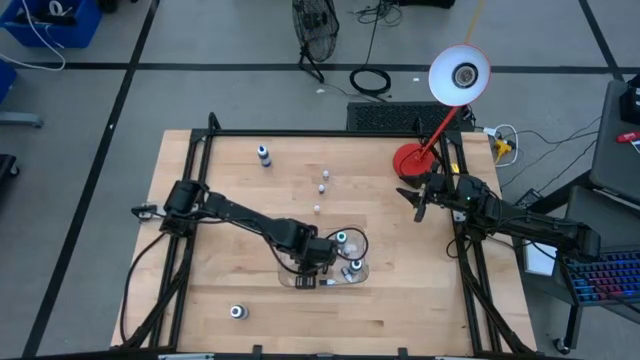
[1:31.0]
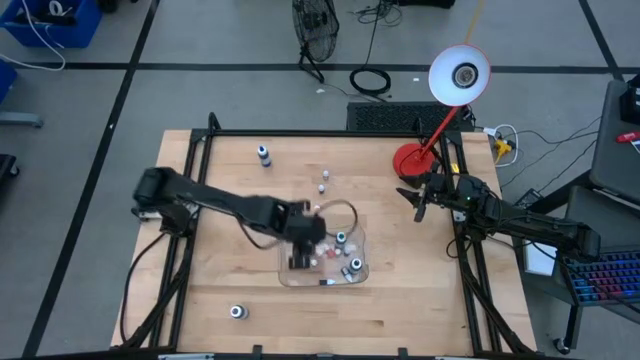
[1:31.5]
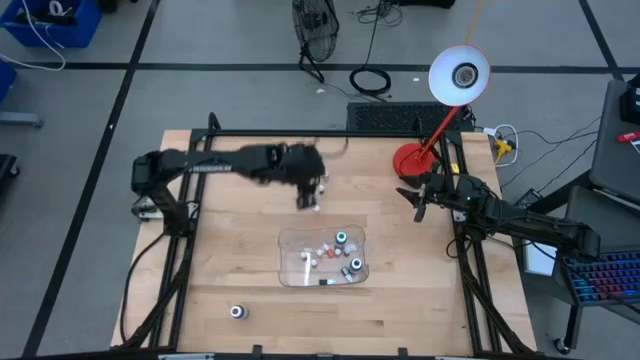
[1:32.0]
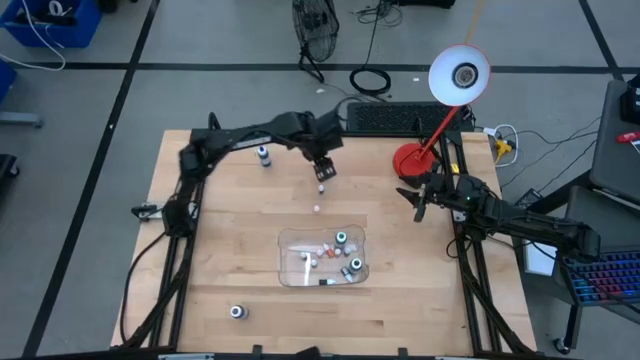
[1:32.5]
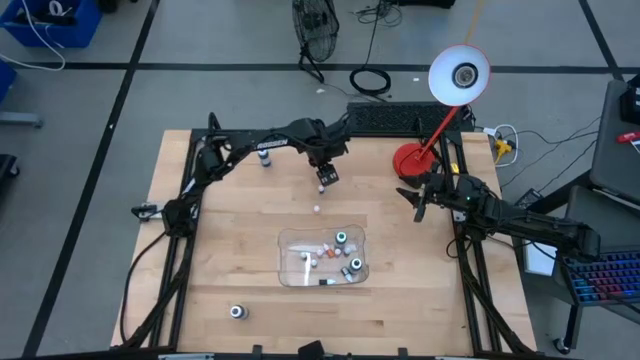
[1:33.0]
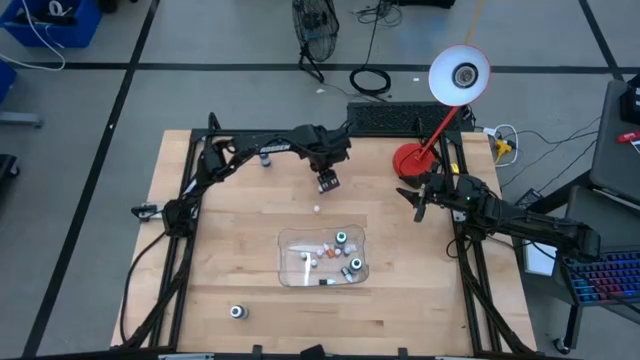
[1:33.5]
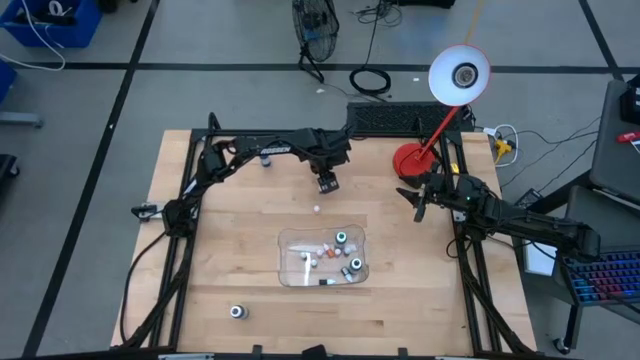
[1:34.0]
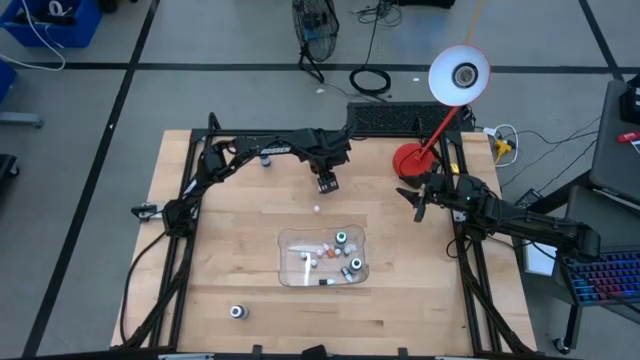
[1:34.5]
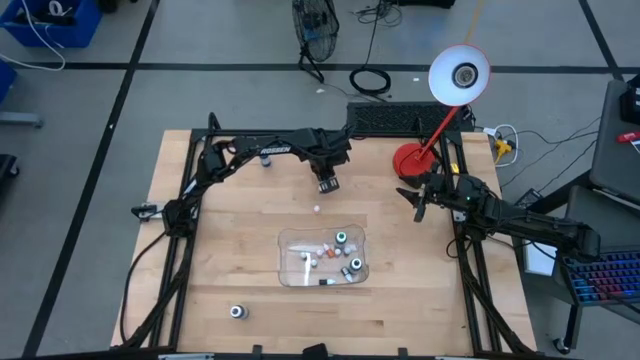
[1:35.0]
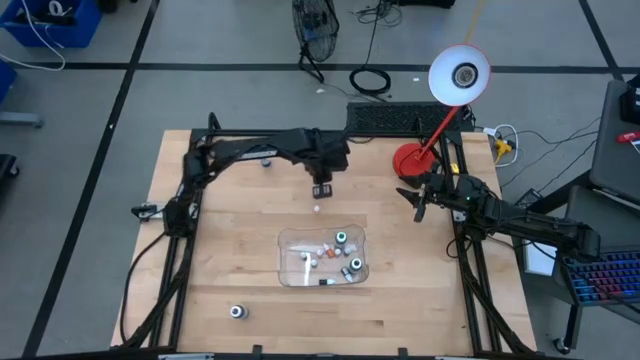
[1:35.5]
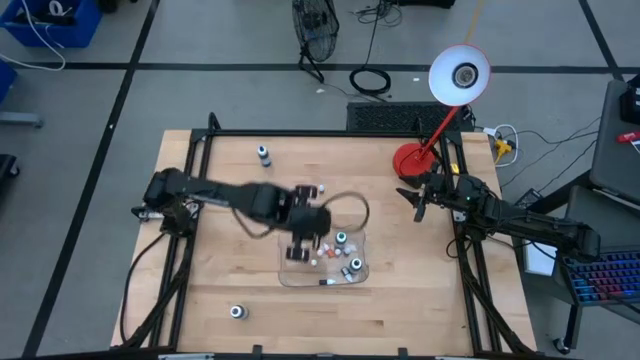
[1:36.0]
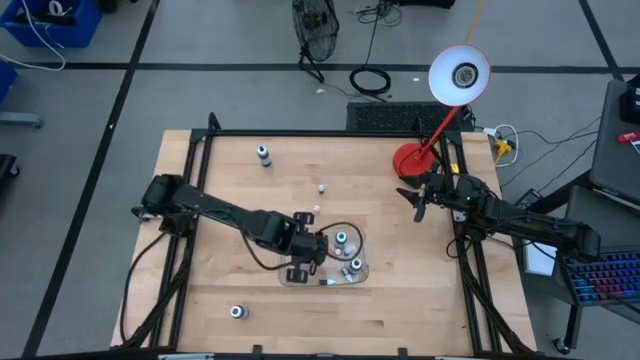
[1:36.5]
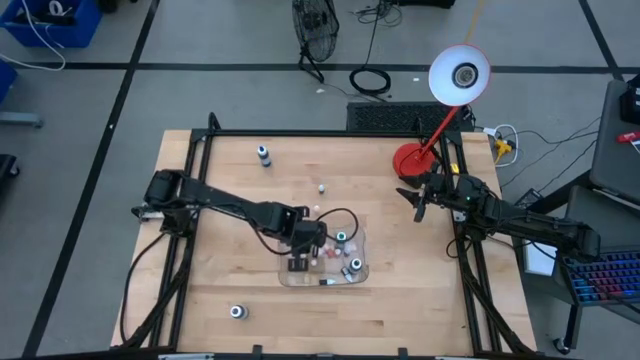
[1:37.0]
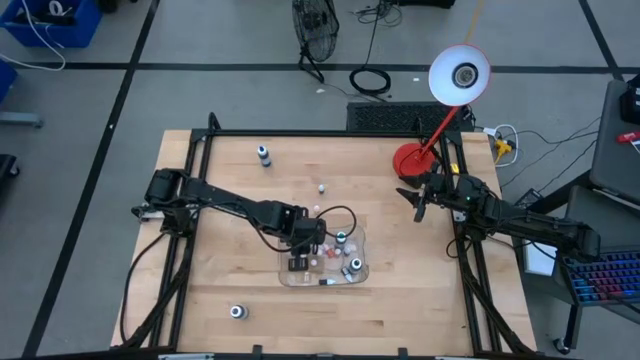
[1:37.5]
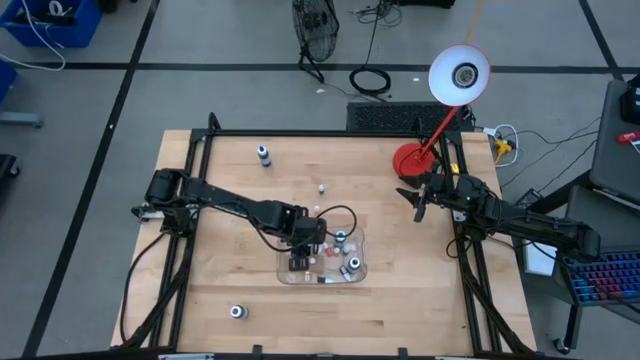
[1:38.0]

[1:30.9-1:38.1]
Task: Pick & Place food coloring
Put the small green food coloring bottle into the transparent bin

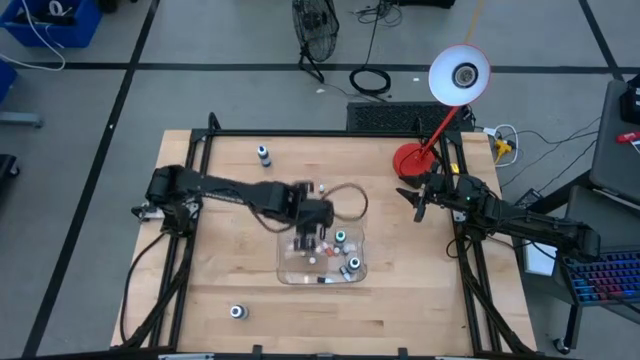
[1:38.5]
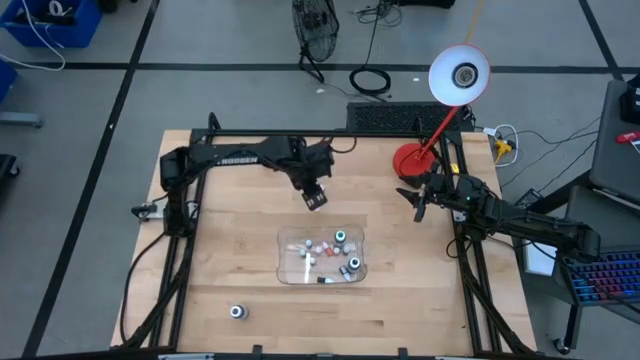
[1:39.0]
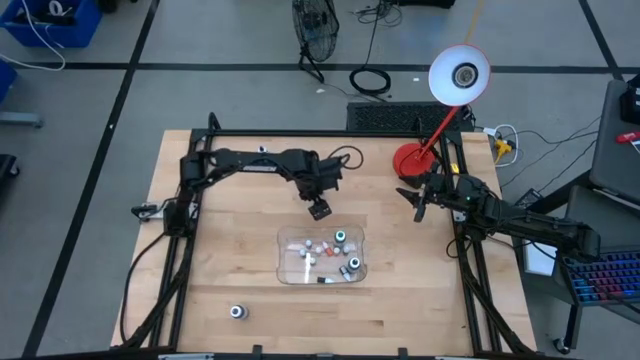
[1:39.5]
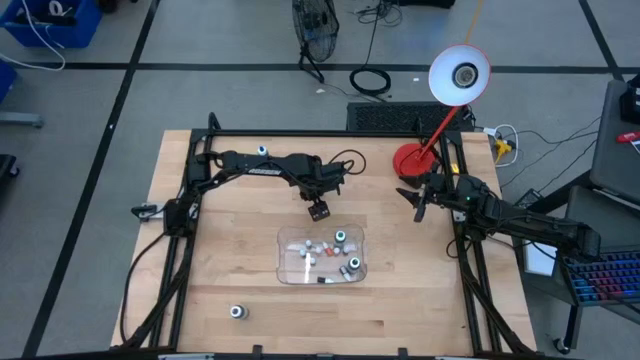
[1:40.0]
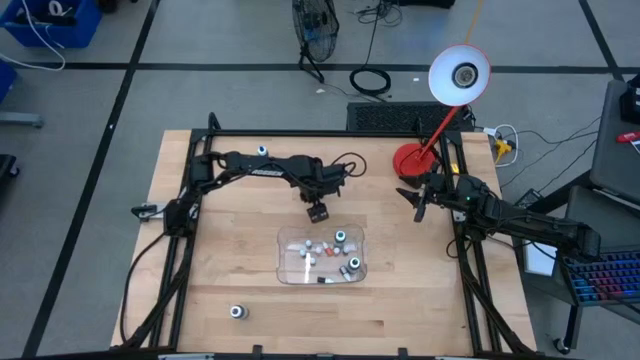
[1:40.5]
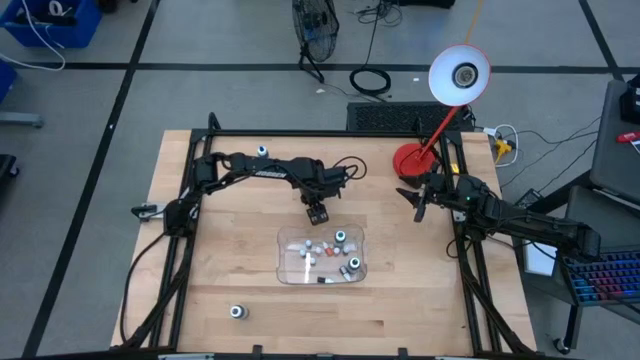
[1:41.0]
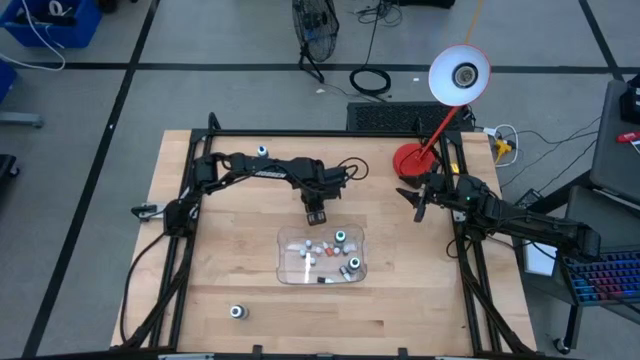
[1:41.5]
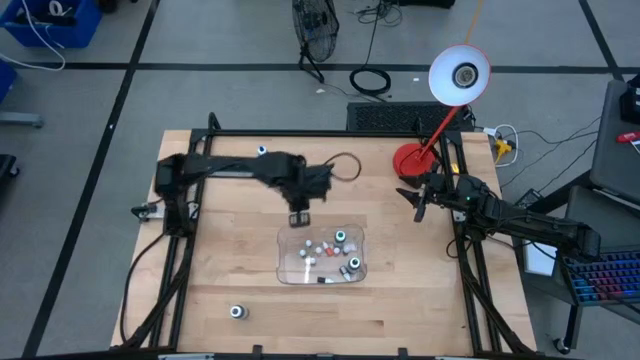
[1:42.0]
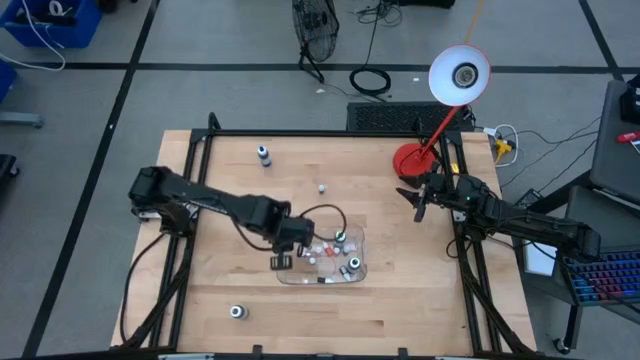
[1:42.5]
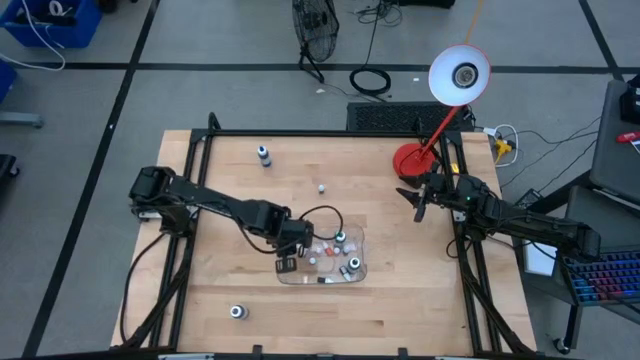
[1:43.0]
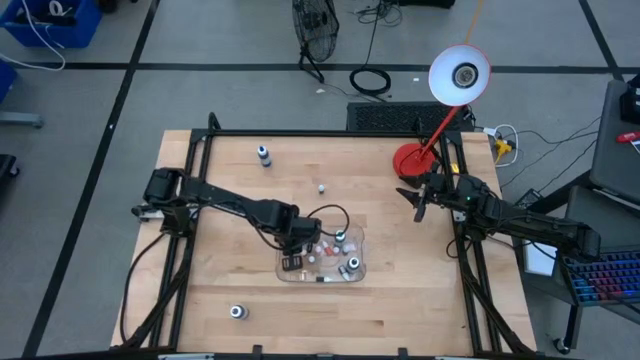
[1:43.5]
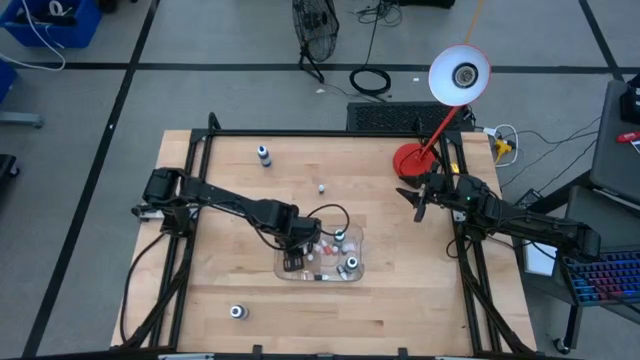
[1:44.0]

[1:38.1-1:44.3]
Put the small orange food coloring bottle into the transparent bin

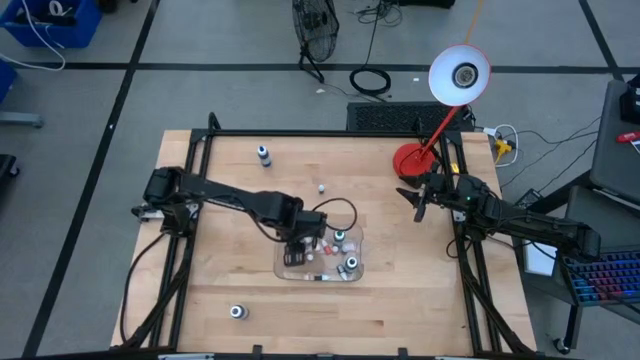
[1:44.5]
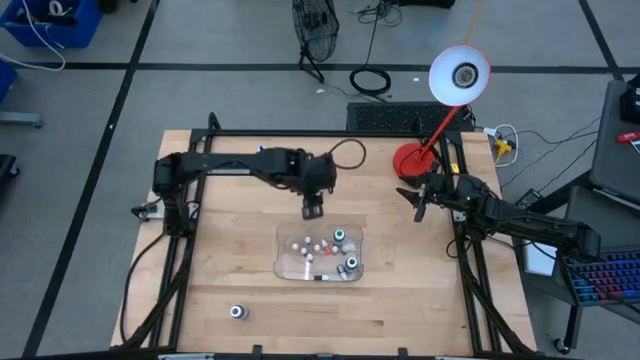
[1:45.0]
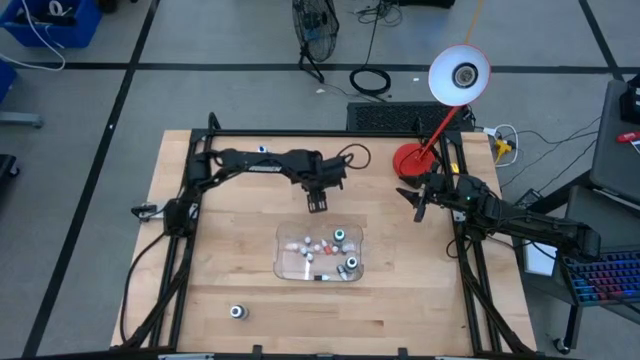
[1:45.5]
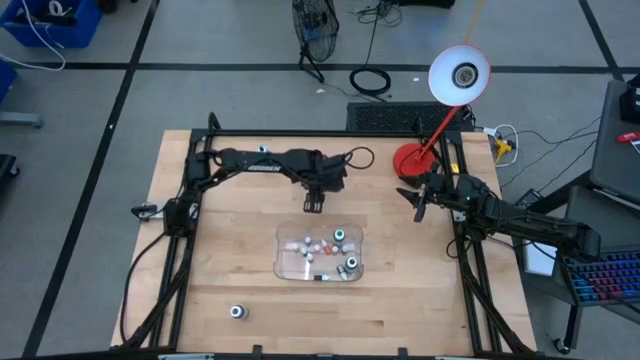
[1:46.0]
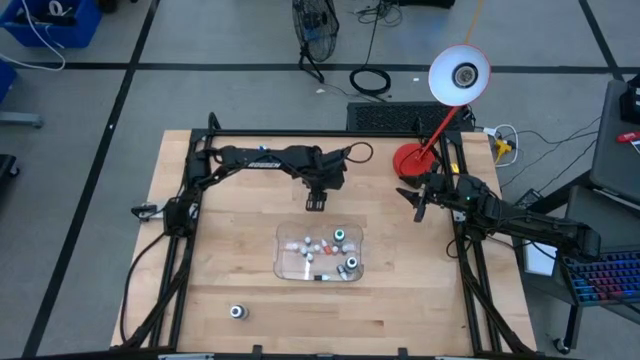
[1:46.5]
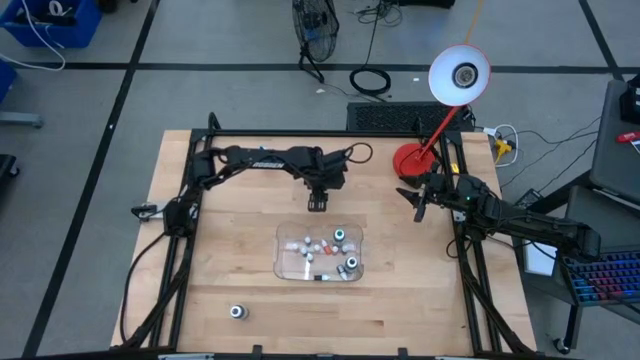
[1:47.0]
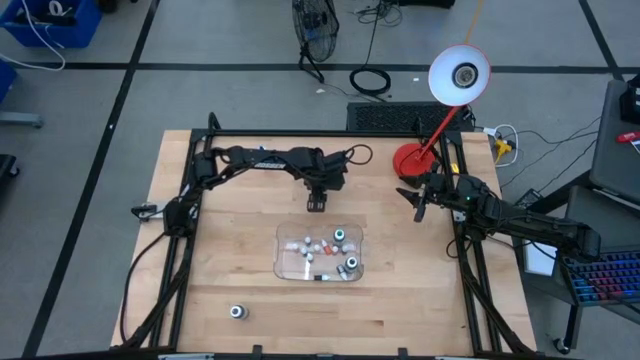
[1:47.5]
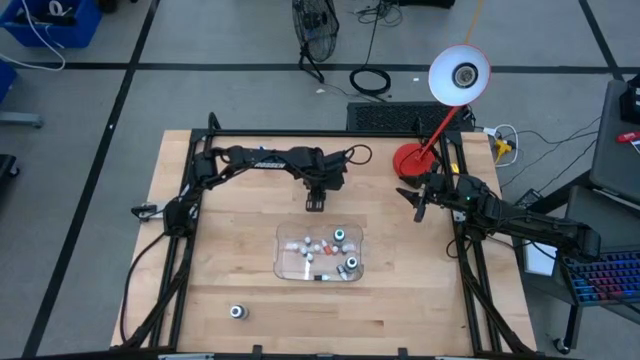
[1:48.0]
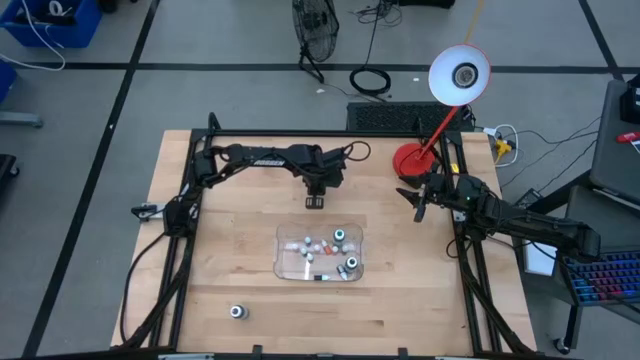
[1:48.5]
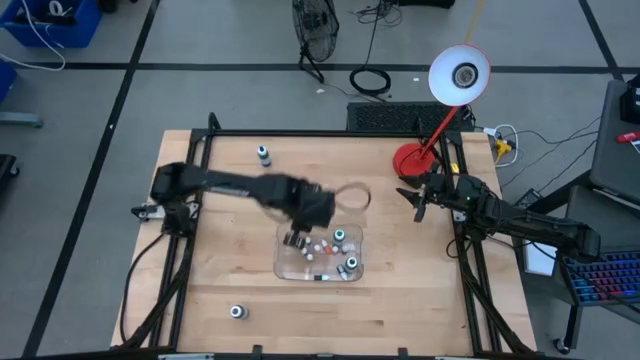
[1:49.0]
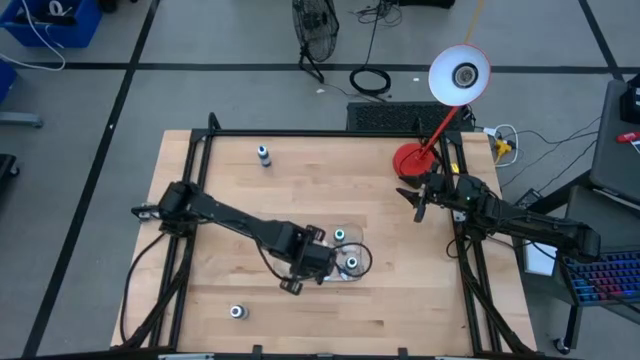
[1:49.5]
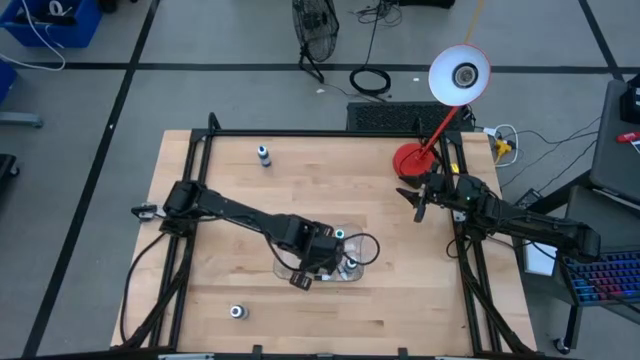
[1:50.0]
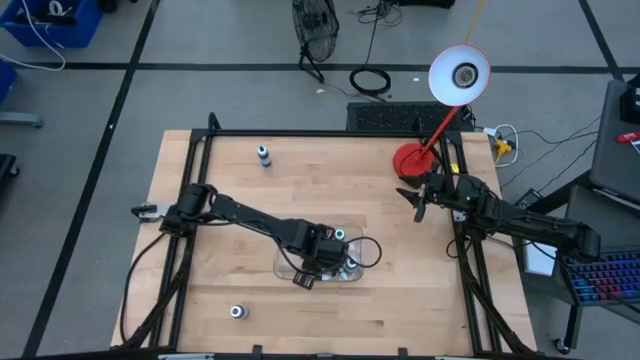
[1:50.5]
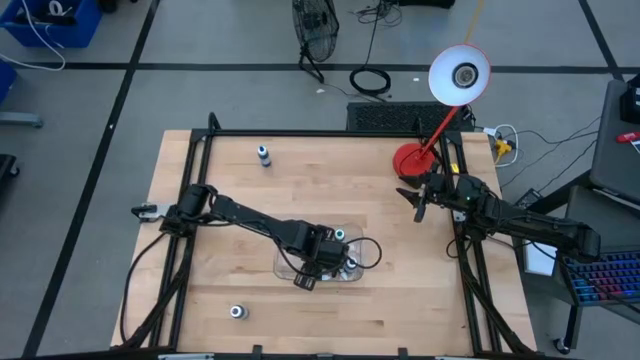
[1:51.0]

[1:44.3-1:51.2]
Put the small blue food coloring bottle into the transparent bin

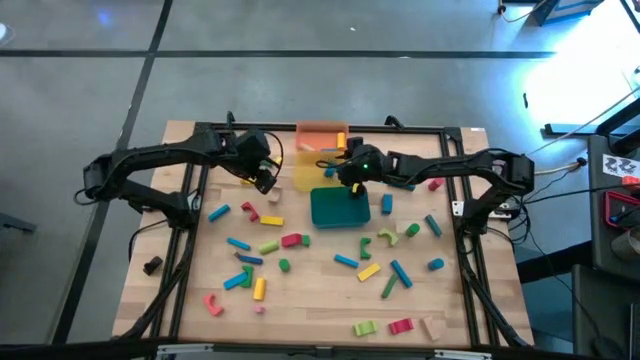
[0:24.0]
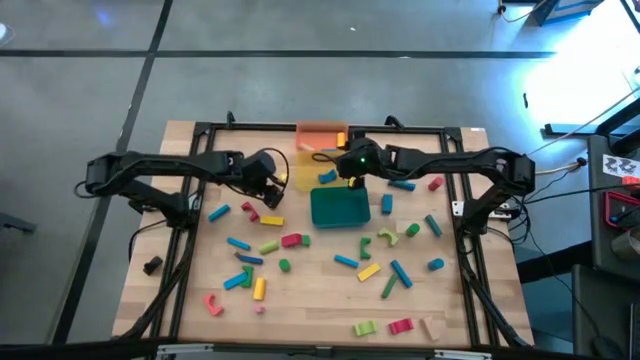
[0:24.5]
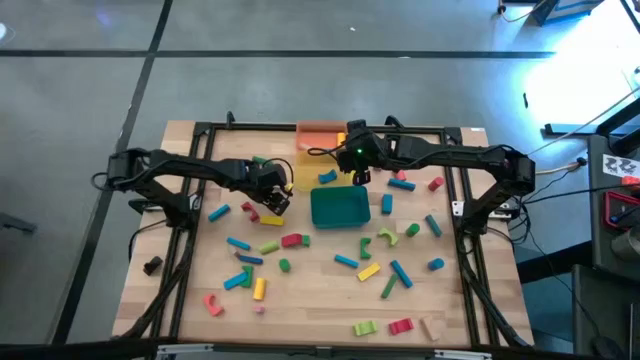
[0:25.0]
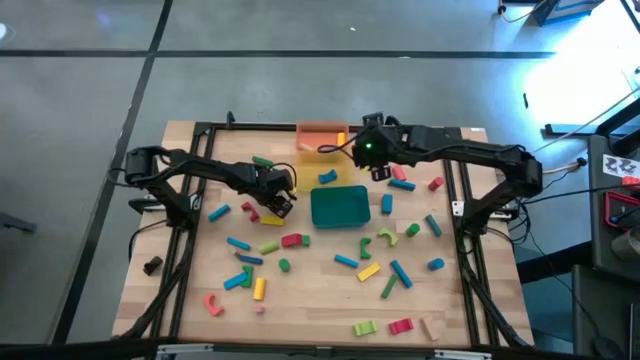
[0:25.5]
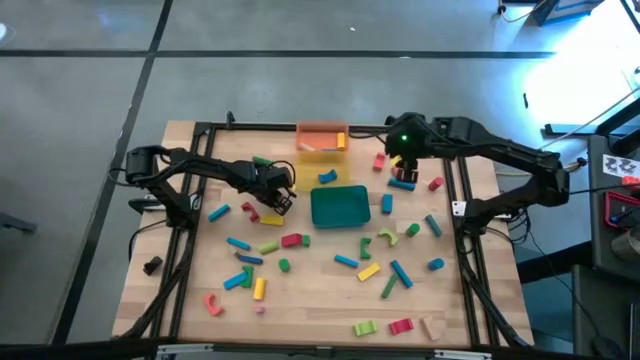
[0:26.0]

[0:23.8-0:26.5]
Task: Sort blocks by size
Put the brown arch block into the yellow bin
